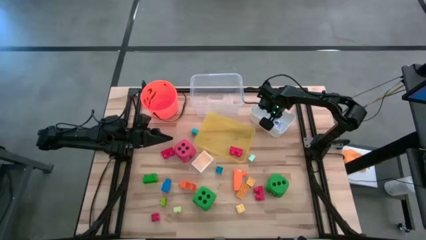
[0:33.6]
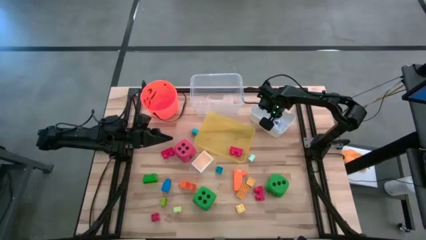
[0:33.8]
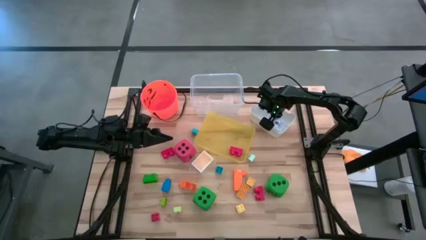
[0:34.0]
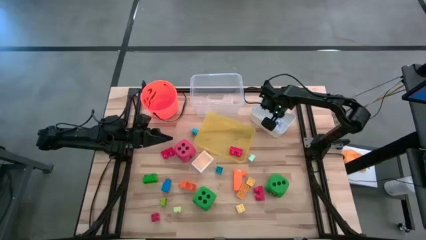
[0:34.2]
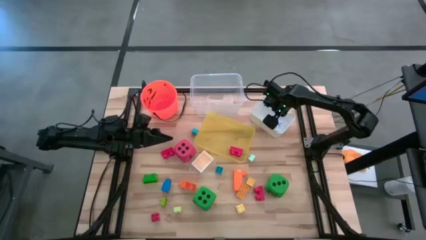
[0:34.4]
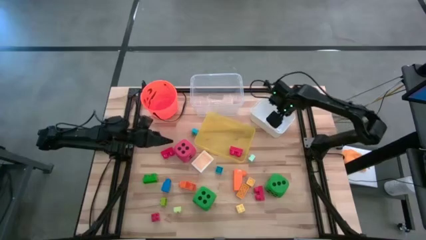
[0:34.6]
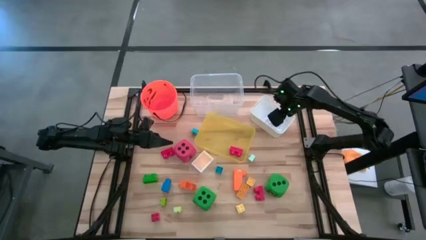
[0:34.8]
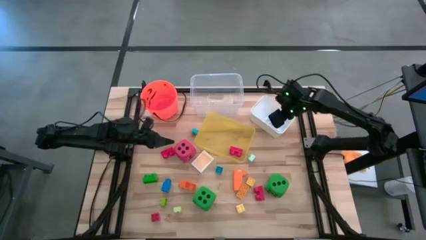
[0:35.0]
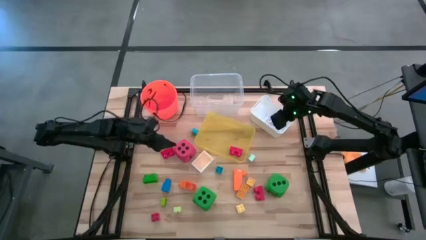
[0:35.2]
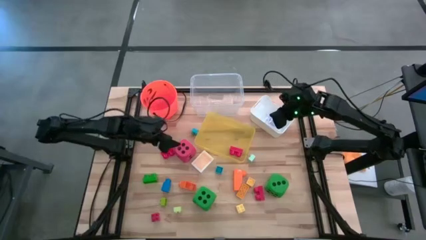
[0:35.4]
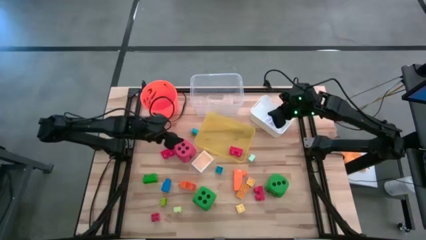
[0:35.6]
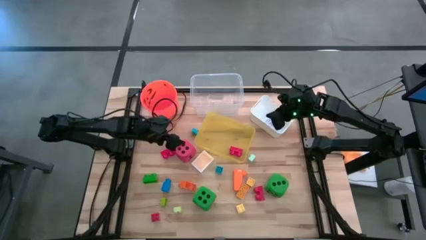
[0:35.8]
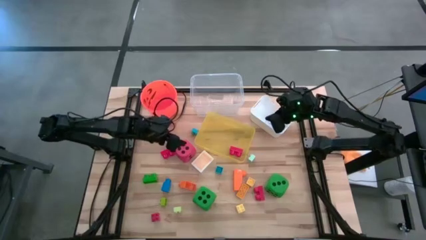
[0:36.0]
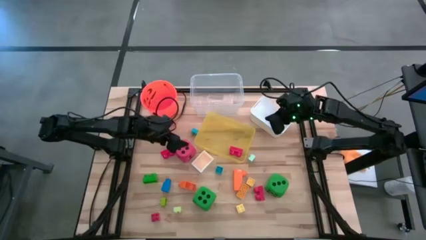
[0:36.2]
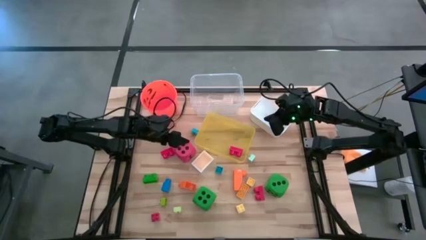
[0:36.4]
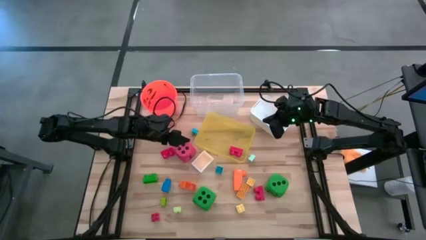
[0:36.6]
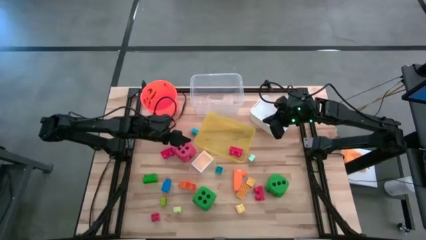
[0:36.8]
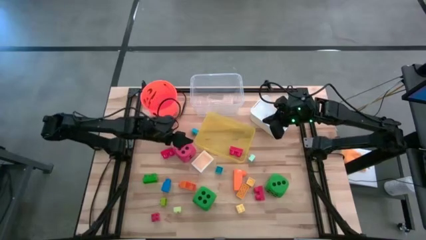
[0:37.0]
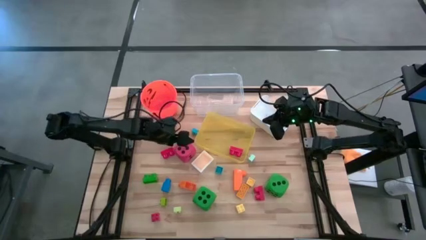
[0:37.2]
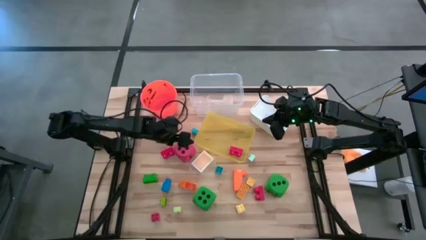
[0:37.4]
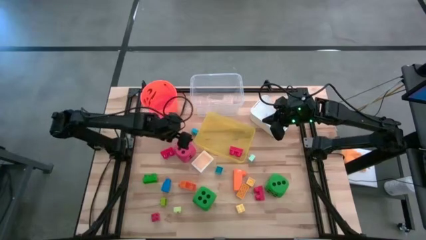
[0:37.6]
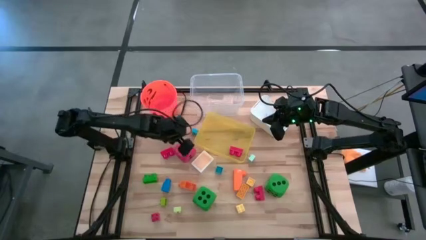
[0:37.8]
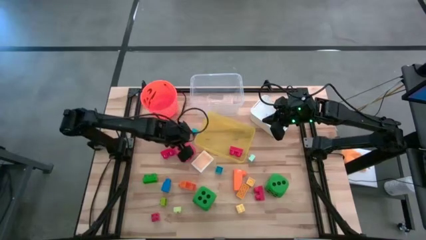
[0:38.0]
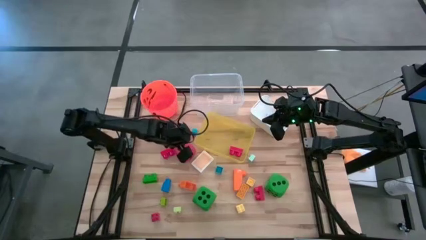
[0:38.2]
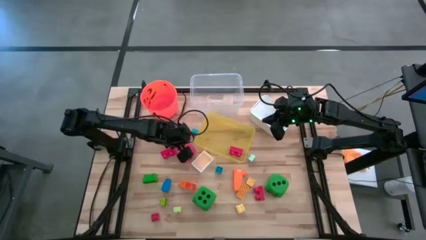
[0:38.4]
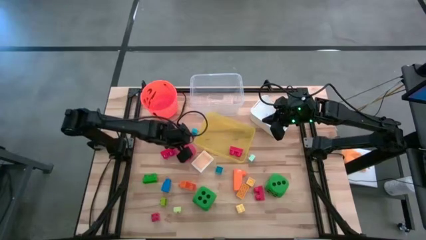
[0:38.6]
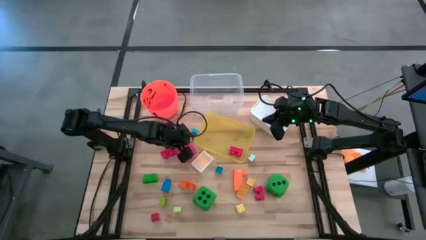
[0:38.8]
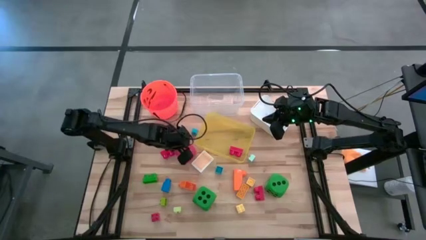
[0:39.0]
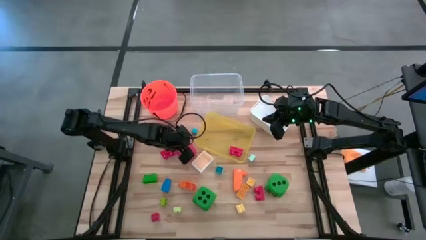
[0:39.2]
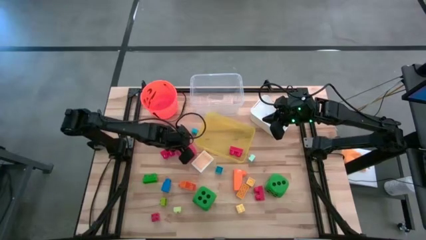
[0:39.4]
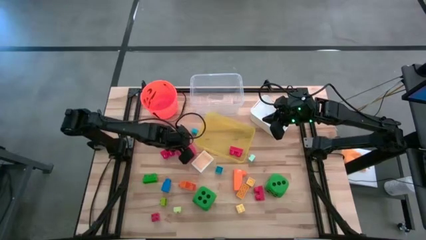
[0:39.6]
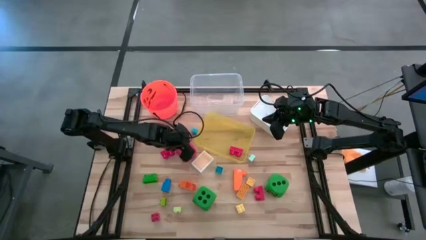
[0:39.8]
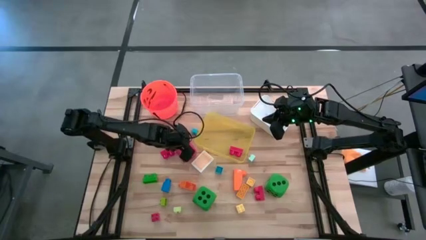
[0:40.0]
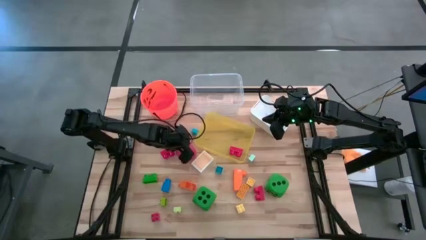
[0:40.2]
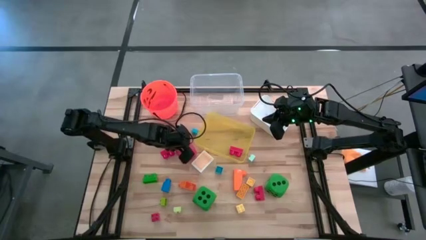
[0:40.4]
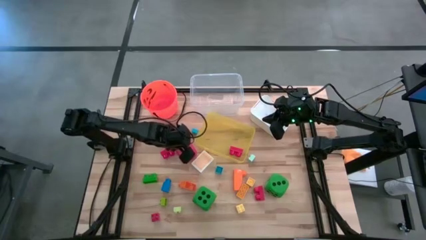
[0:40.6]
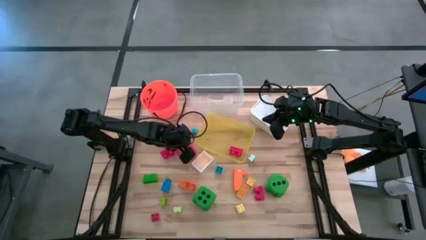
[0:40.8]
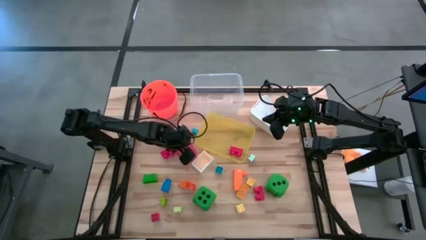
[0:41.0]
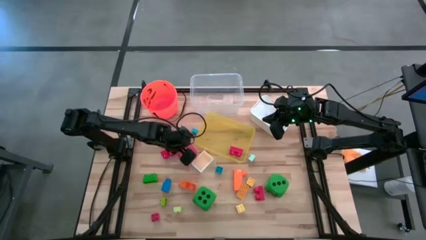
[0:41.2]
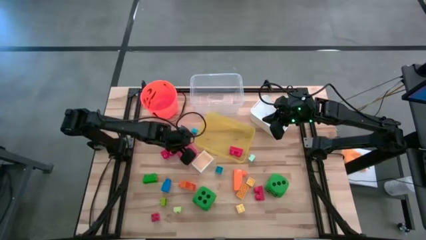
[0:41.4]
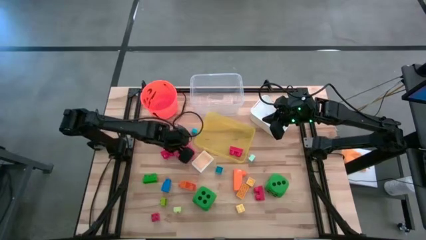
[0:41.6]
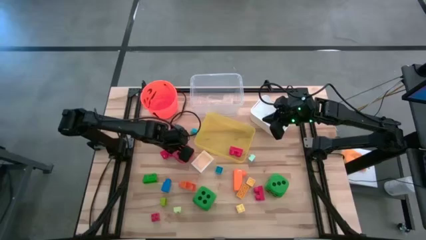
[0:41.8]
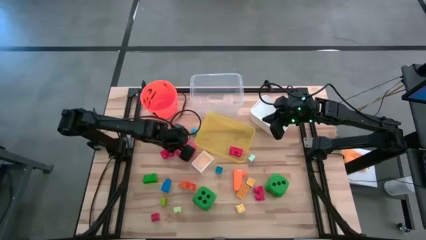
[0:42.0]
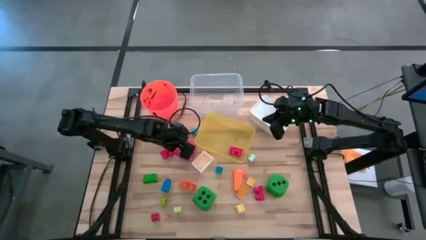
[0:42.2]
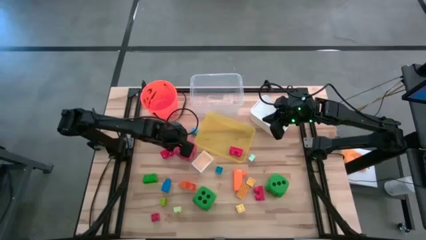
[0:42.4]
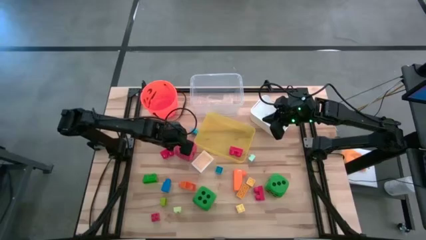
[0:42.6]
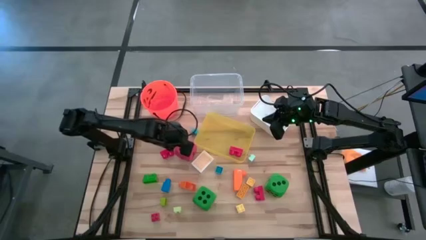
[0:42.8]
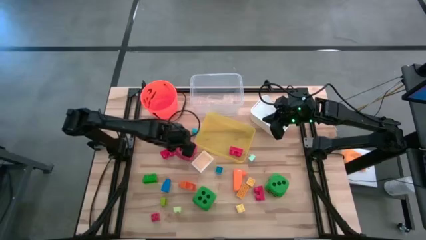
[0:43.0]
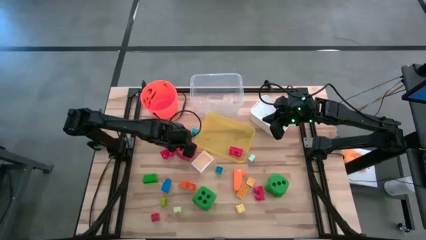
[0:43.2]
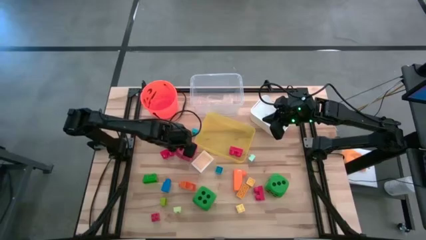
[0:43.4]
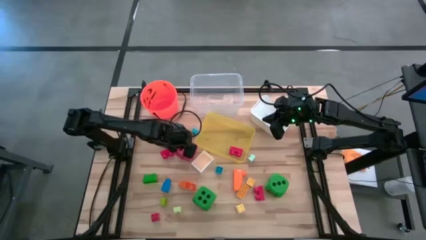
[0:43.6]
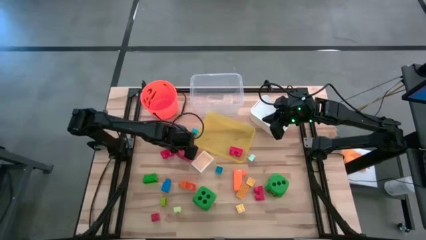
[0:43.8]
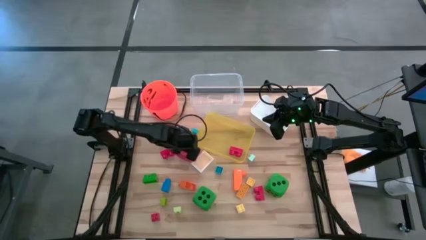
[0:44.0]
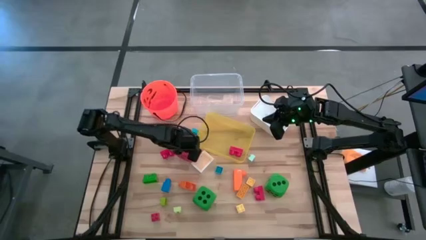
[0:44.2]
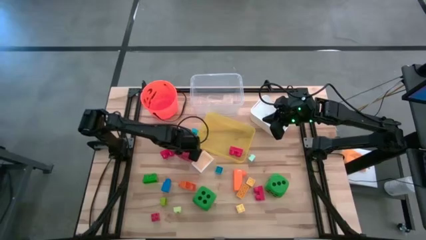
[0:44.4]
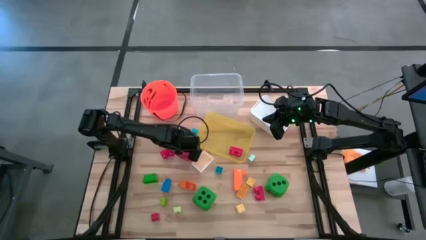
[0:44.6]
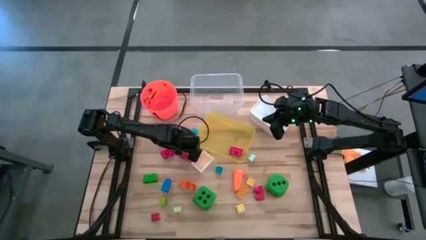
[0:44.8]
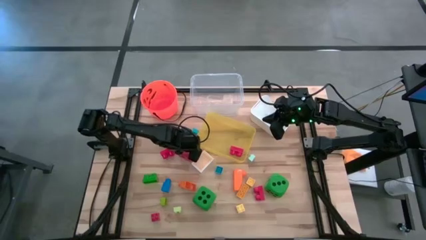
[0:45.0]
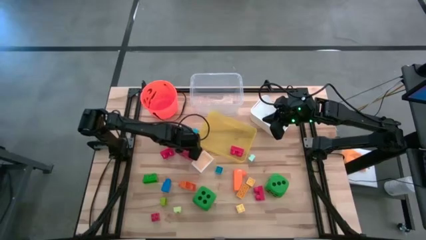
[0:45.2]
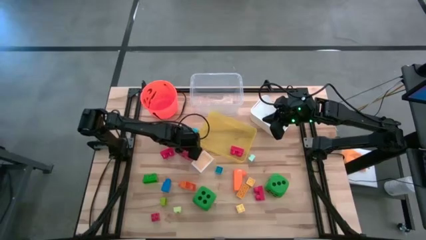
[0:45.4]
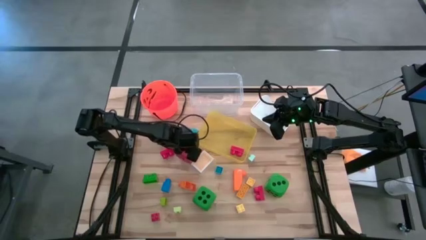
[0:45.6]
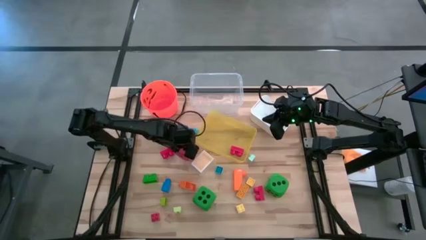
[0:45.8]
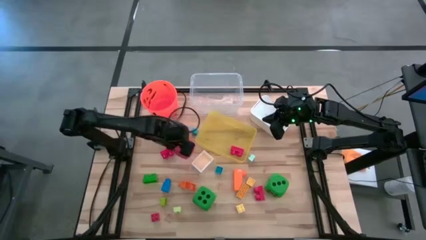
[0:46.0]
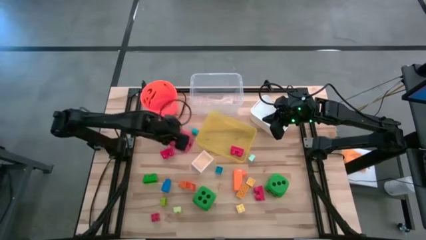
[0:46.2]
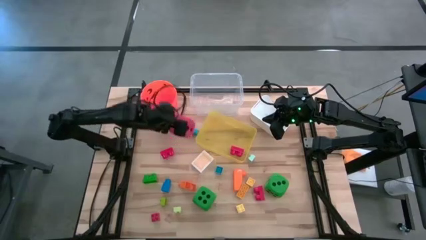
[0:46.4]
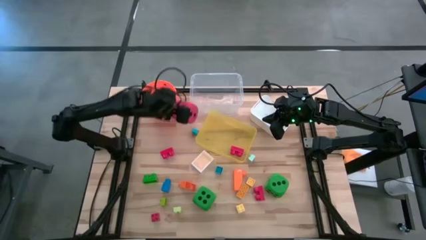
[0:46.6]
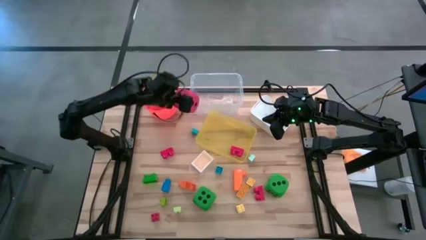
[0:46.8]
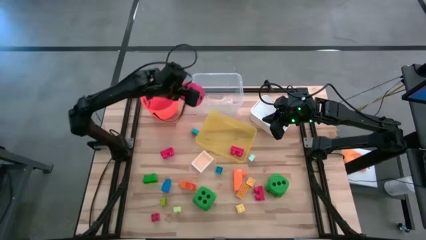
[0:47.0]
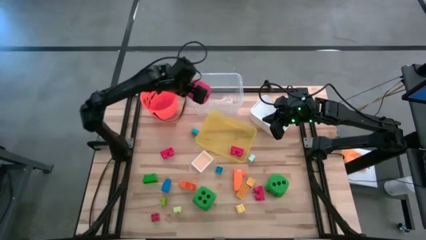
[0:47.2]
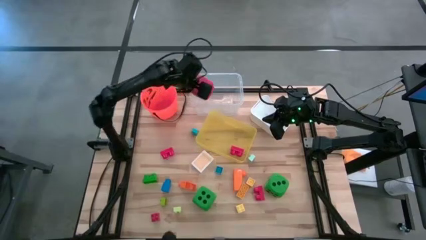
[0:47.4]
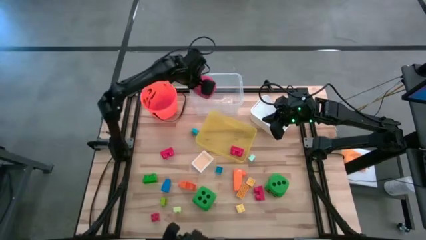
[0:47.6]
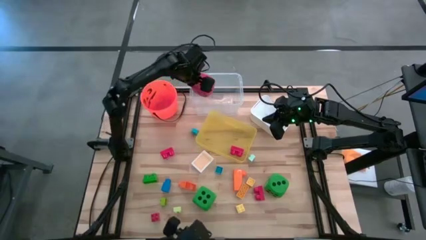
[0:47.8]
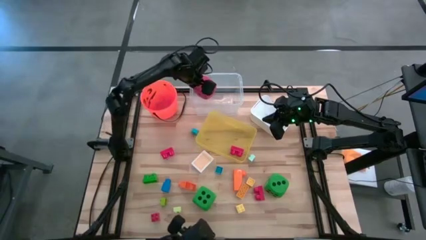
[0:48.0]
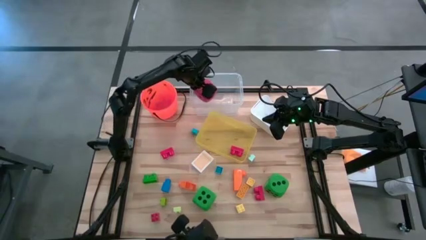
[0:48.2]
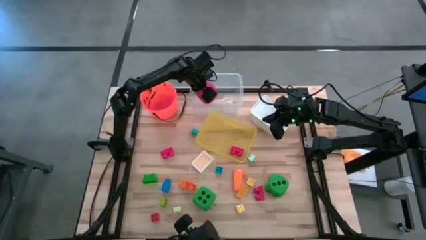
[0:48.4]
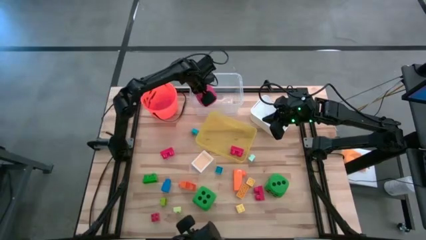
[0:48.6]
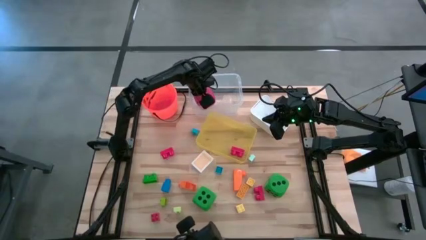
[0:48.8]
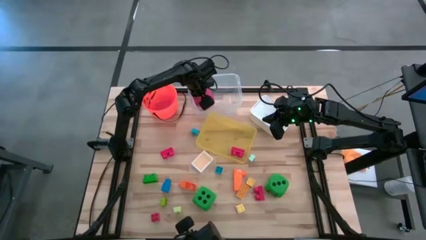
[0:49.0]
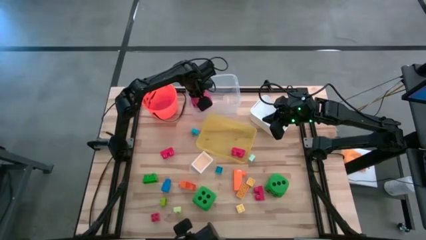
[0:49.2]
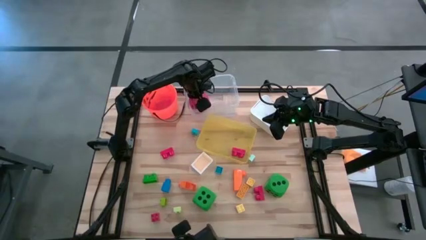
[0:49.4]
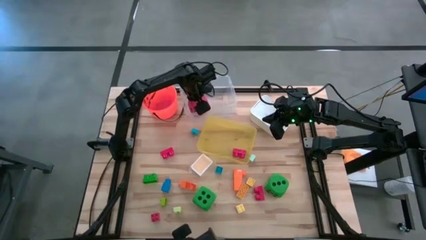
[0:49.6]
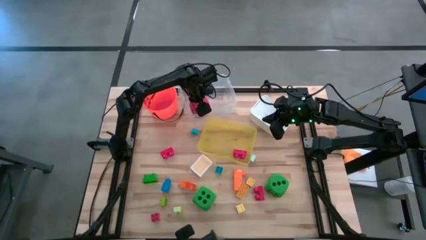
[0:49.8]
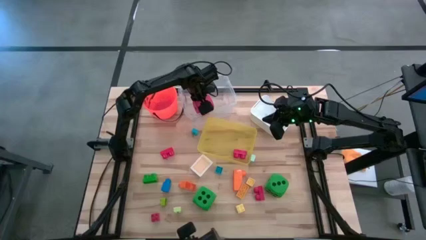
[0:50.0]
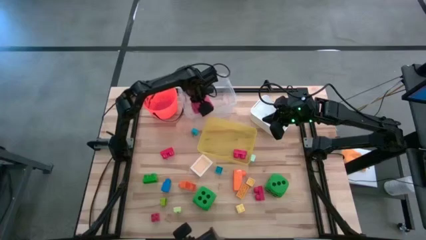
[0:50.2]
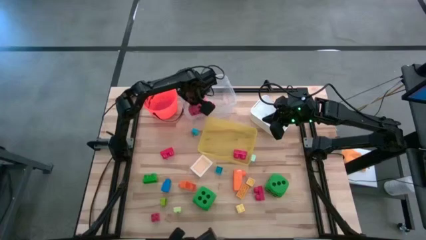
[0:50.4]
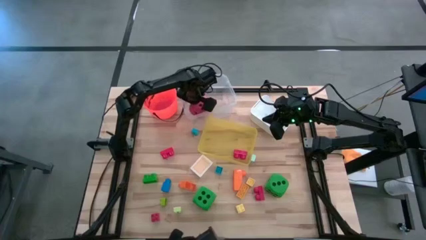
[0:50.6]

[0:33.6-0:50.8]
Task: Pick & Place Toys
Put the red dice into the transparent bin
